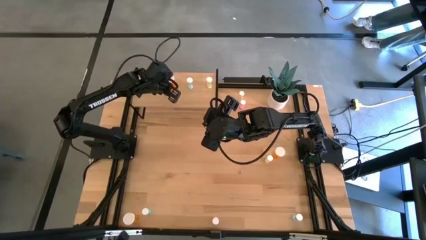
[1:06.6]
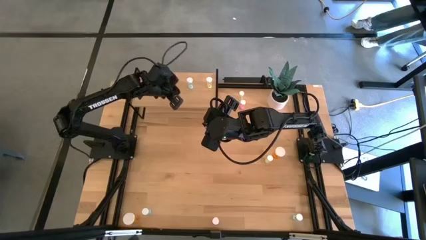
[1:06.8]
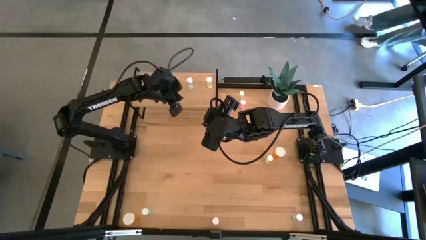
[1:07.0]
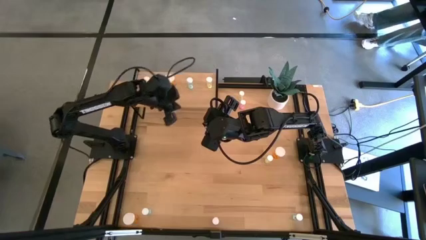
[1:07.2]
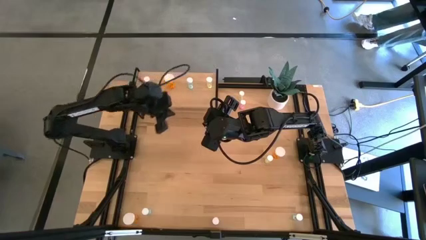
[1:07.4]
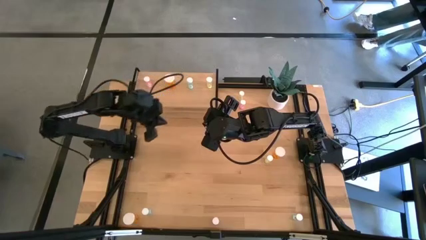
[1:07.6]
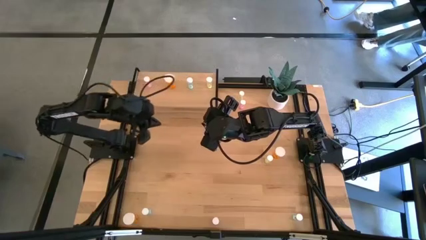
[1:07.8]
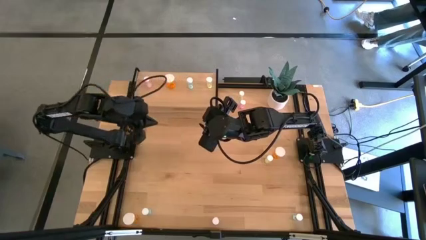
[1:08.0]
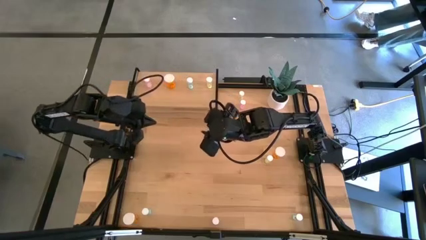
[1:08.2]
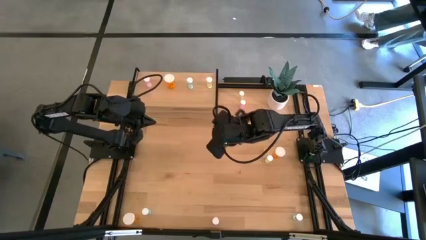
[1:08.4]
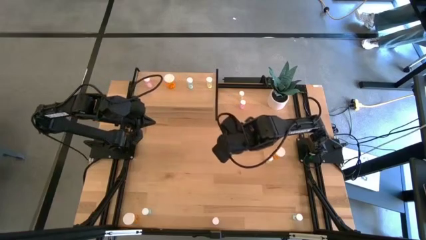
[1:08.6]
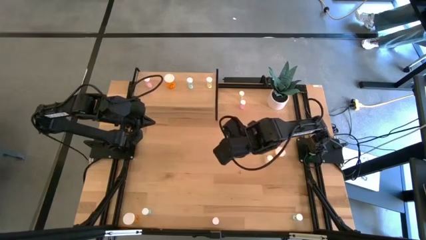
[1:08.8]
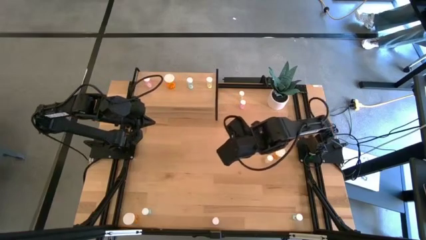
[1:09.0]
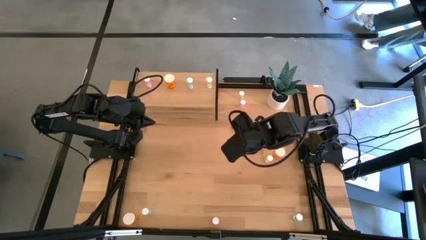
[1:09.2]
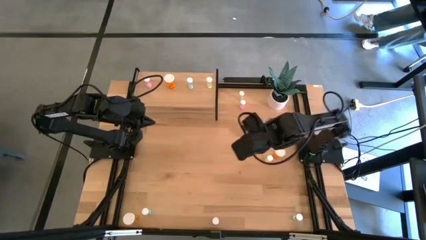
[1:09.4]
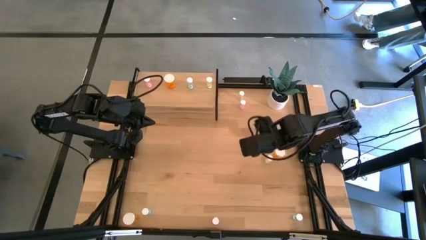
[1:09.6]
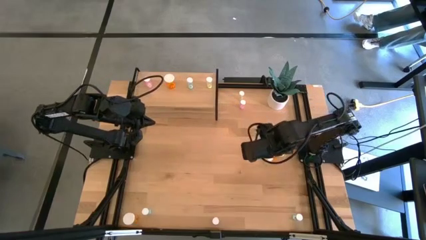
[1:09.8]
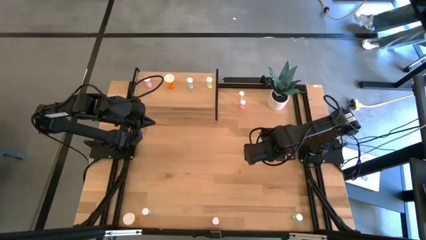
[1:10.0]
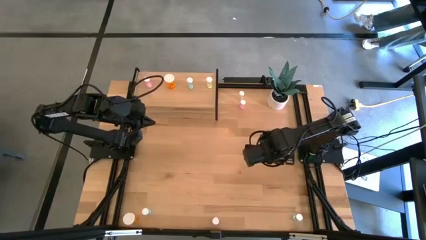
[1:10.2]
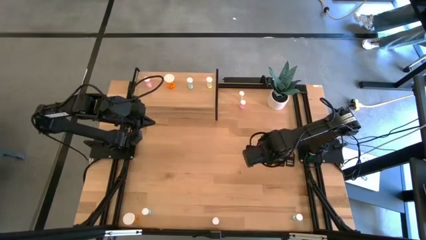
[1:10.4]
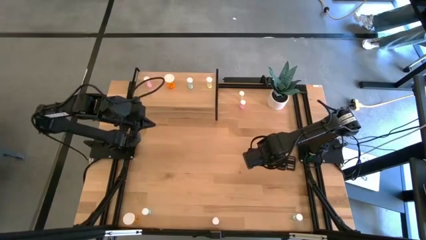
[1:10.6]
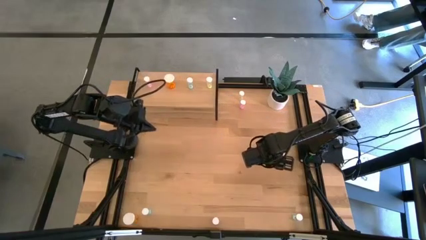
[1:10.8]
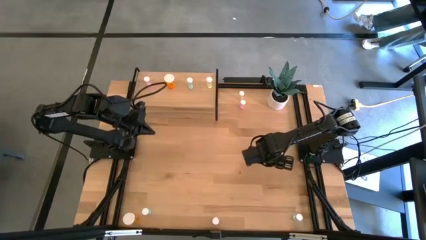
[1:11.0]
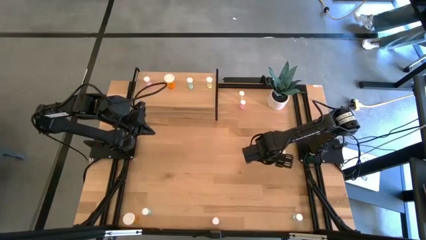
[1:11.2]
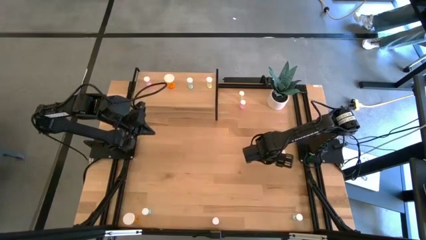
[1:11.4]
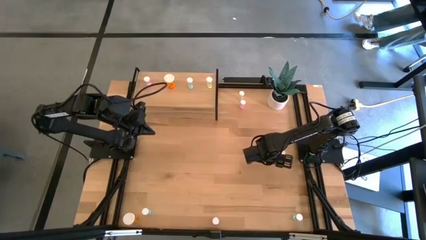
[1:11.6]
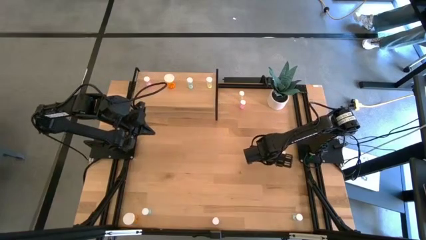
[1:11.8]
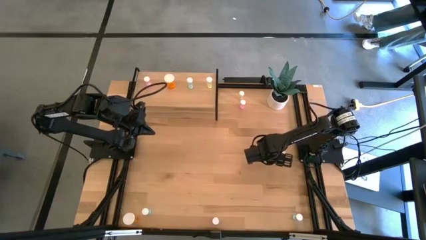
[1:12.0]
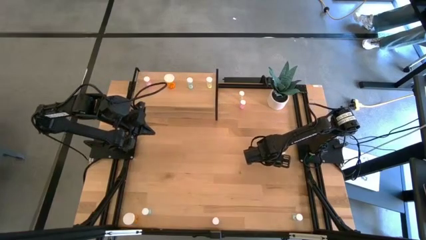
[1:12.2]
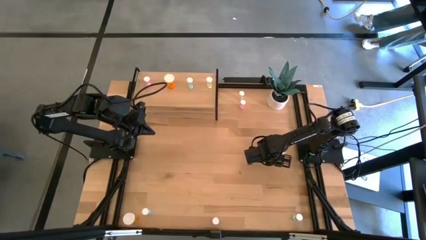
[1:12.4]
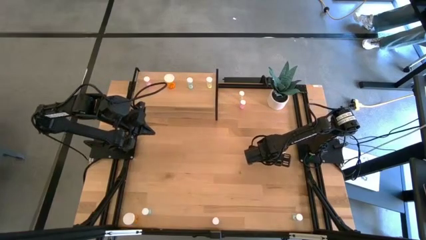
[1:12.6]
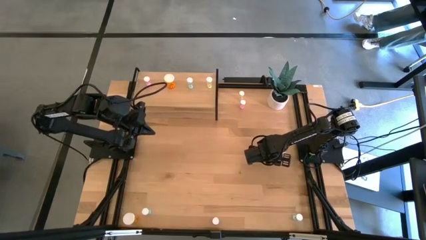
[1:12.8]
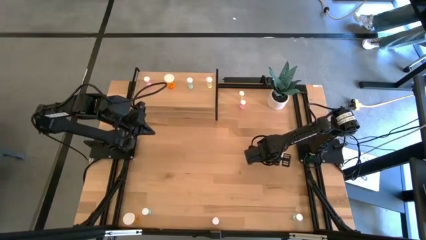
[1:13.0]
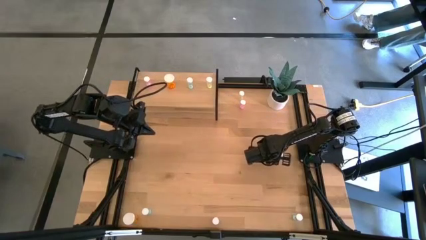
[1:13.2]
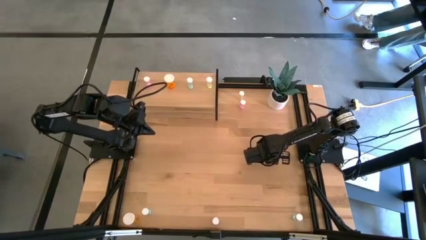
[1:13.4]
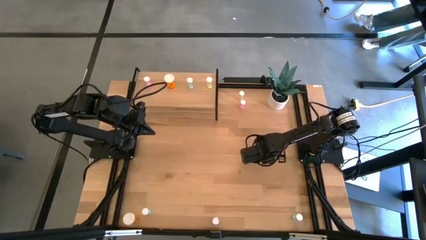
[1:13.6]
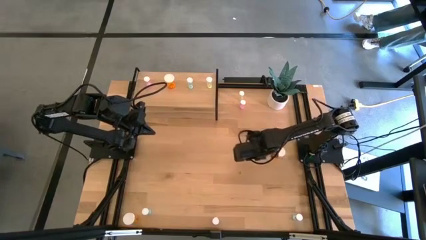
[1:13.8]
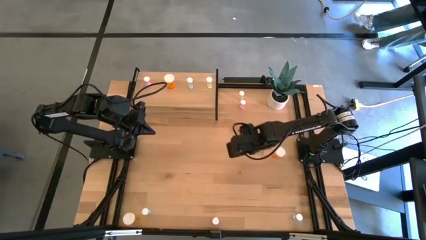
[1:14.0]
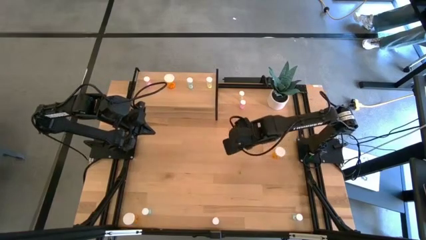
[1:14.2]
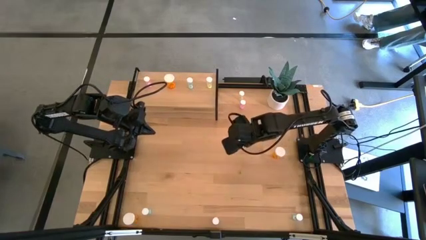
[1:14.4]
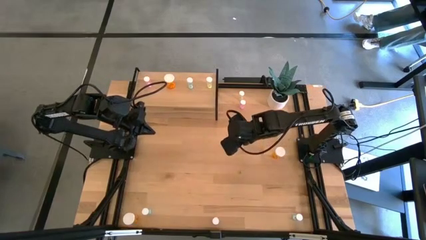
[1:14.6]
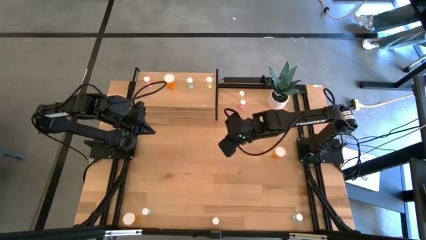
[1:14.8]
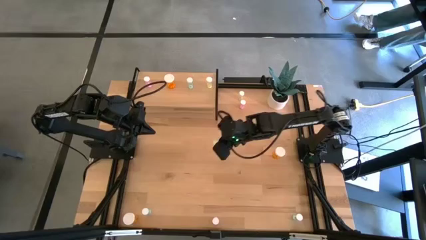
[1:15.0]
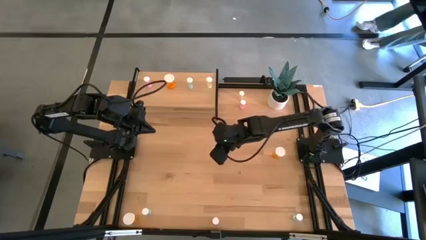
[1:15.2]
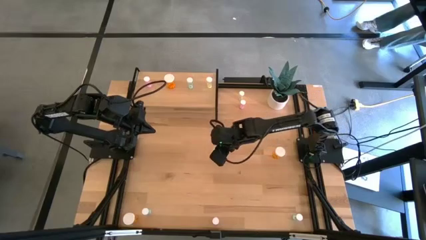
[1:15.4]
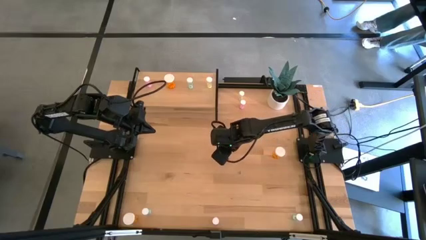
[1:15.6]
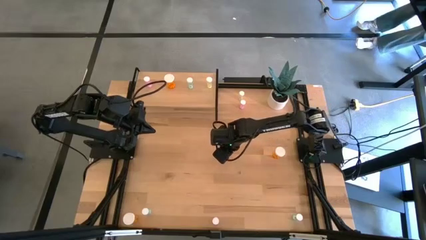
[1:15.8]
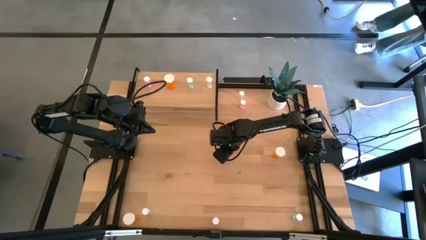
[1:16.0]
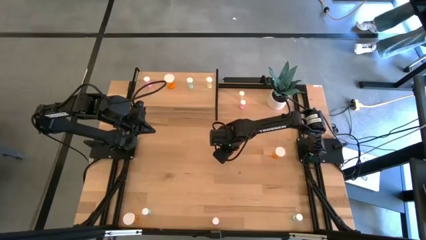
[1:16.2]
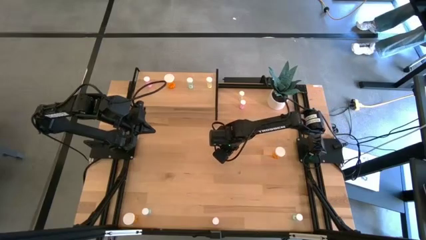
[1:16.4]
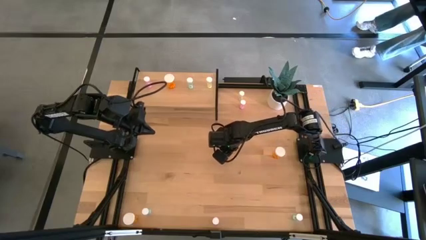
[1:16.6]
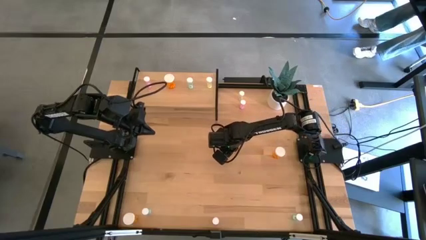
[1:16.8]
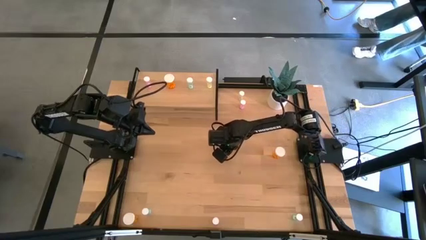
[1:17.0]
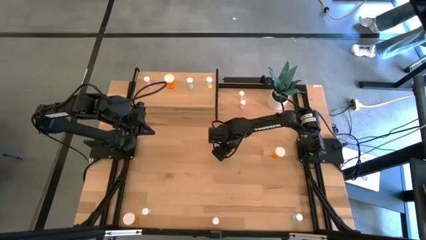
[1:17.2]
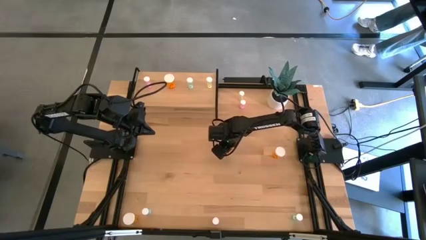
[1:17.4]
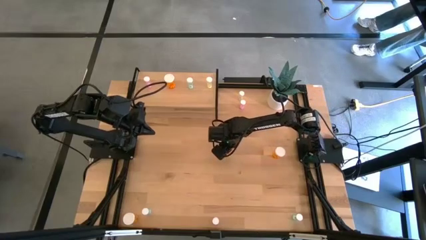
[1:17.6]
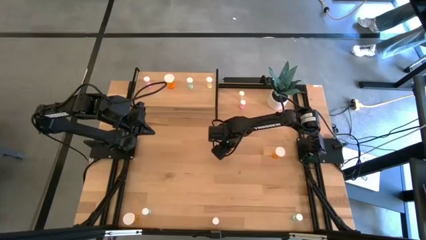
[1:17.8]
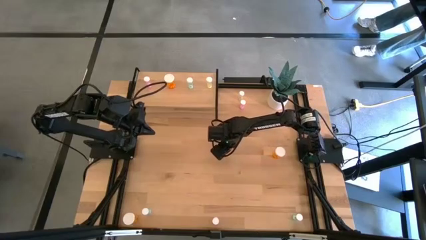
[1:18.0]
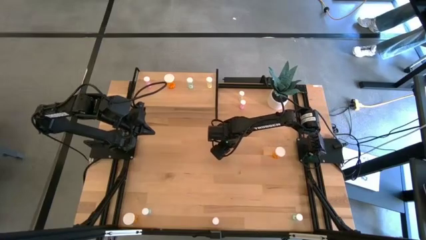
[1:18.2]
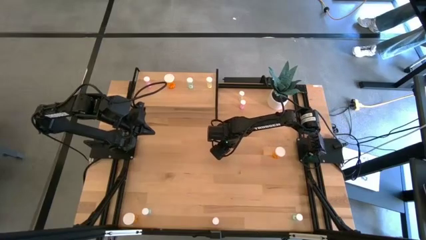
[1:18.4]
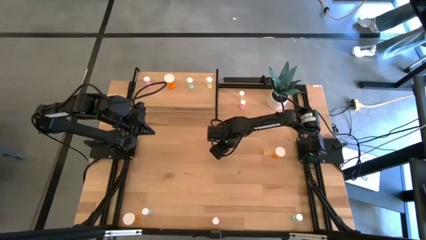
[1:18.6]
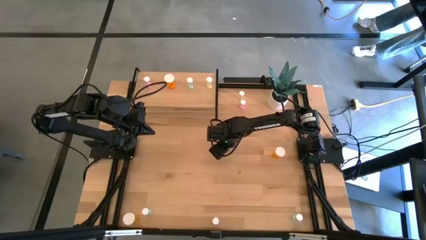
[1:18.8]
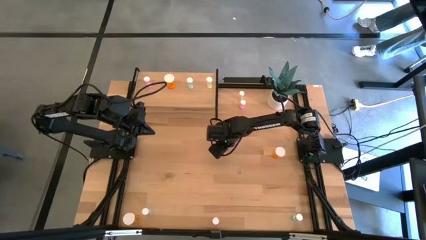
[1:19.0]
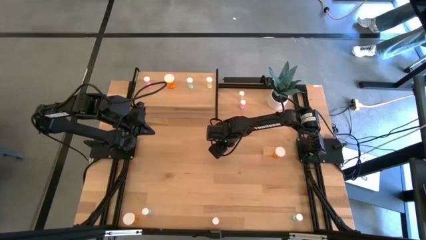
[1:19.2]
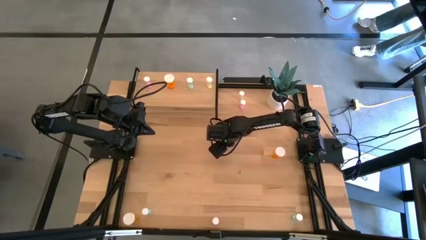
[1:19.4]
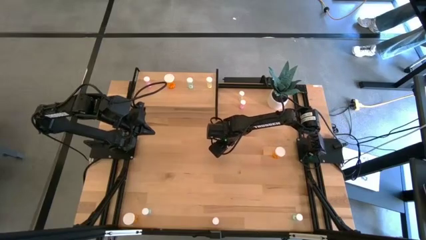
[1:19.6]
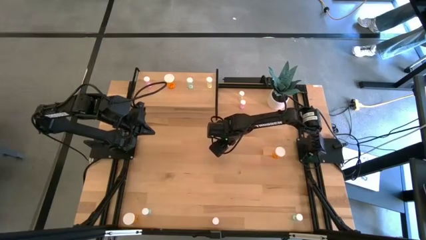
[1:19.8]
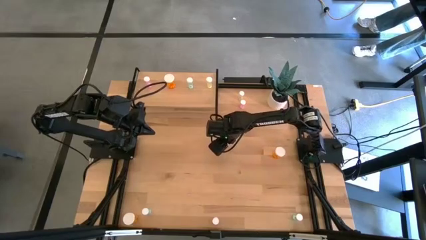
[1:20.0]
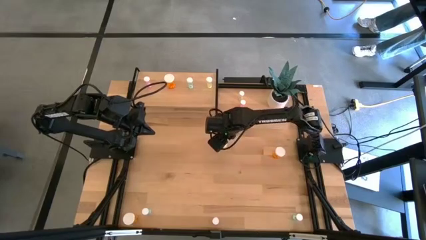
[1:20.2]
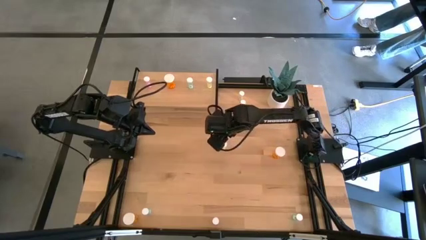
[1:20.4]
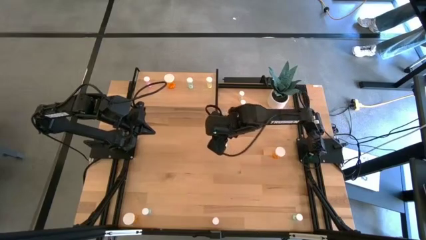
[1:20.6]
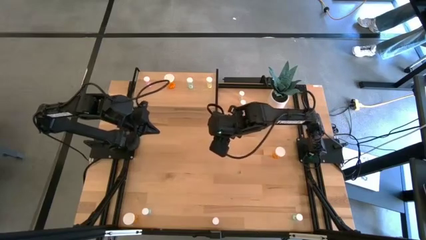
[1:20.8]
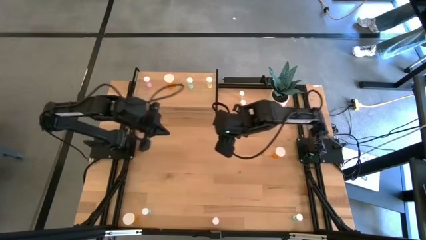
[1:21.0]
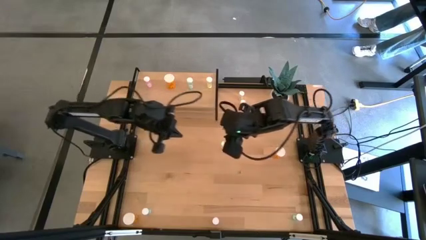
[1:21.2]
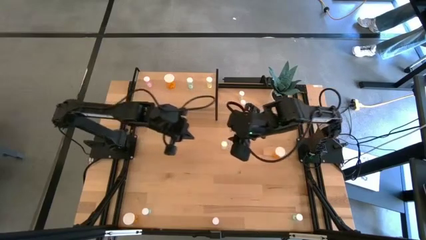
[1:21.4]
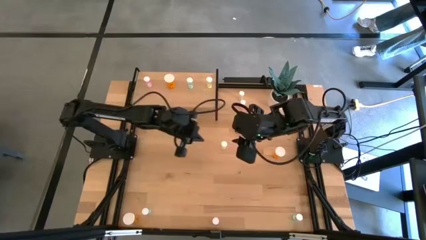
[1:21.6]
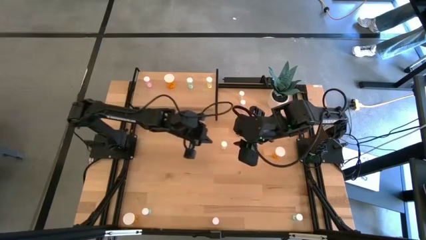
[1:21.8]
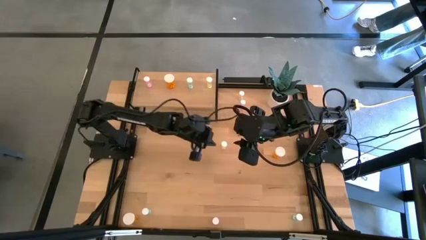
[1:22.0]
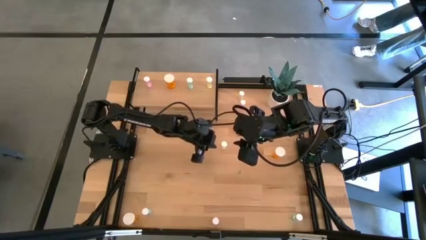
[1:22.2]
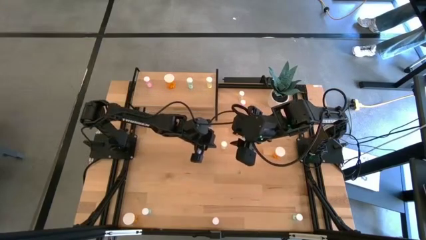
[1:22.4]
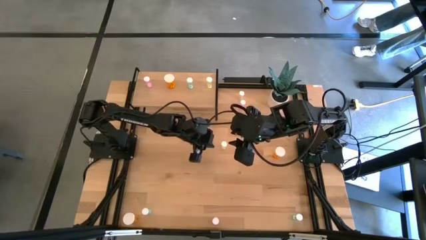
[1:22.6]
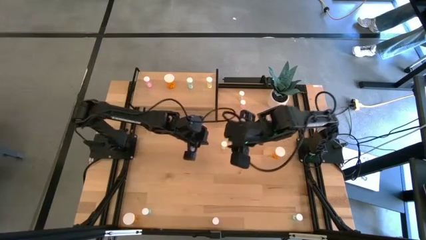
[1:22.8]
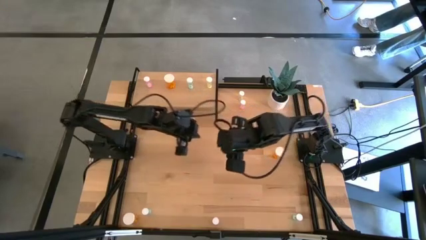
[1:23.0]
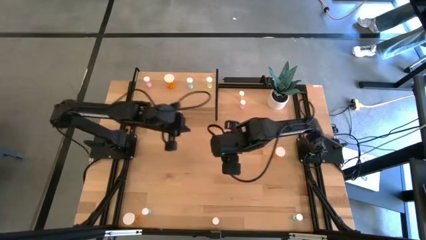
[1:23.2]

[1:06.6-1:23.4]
Task: Pick and place medicine bottles onto shelf by color
Put the bottom yellow pill bottle on the shelf aligned with the other yellow pill bottle
